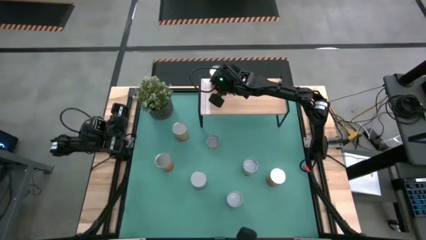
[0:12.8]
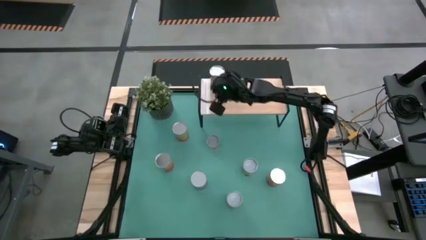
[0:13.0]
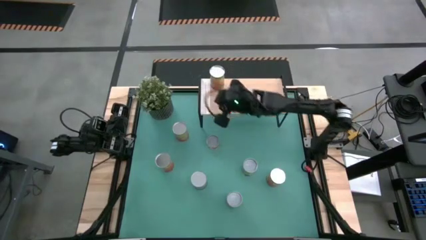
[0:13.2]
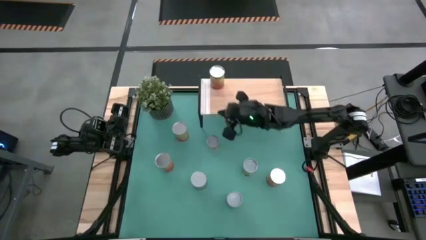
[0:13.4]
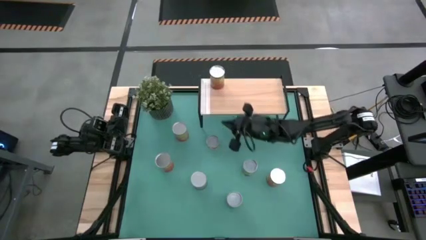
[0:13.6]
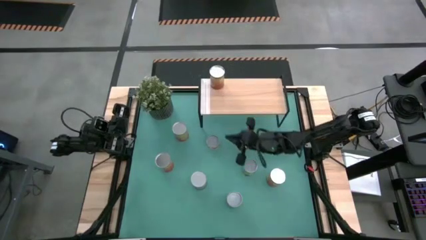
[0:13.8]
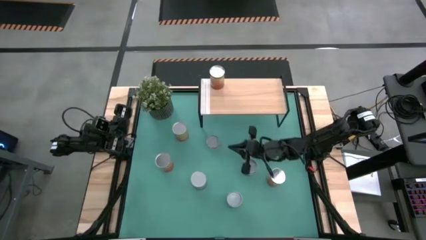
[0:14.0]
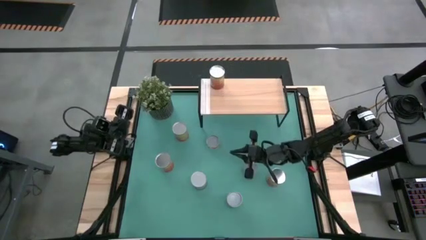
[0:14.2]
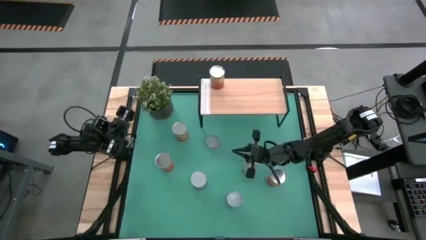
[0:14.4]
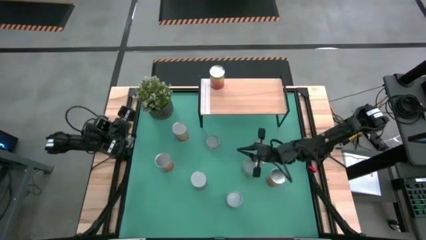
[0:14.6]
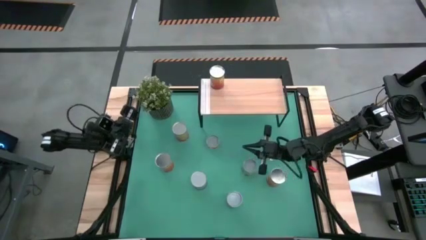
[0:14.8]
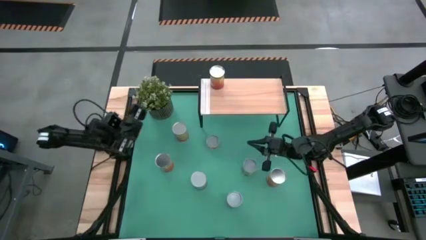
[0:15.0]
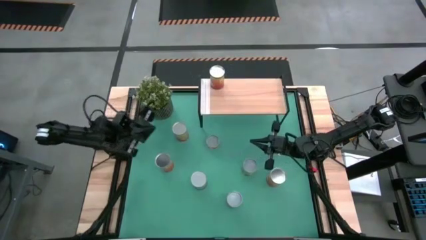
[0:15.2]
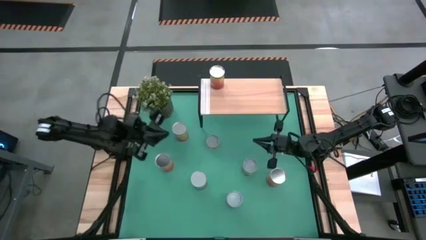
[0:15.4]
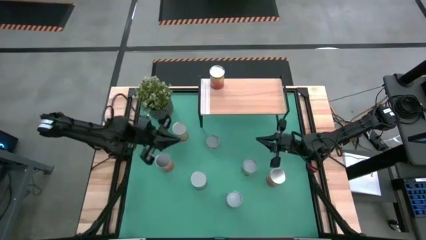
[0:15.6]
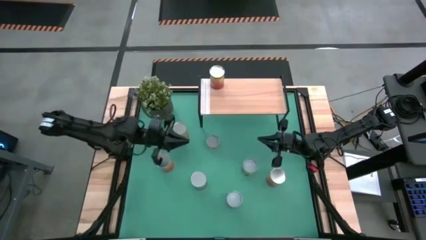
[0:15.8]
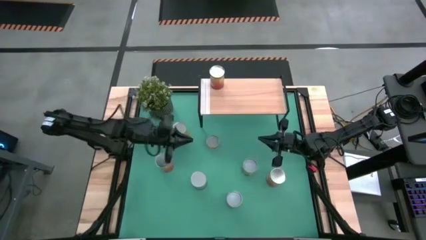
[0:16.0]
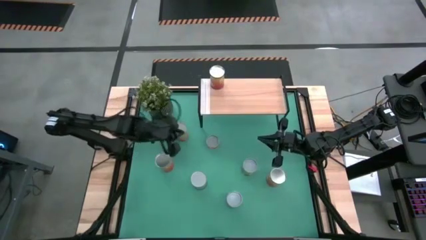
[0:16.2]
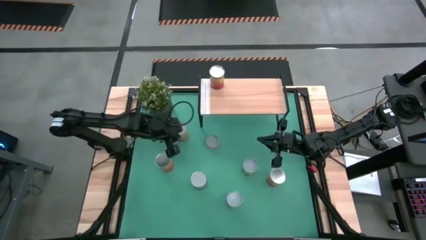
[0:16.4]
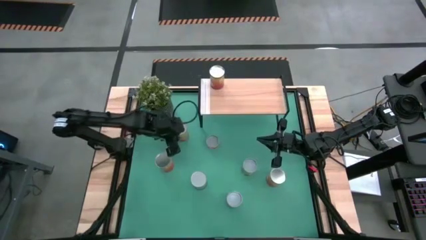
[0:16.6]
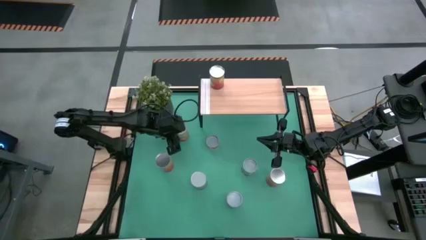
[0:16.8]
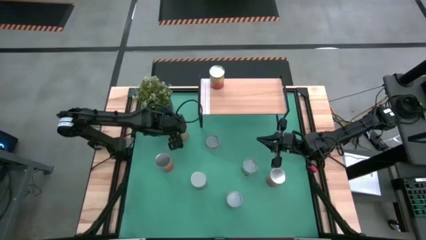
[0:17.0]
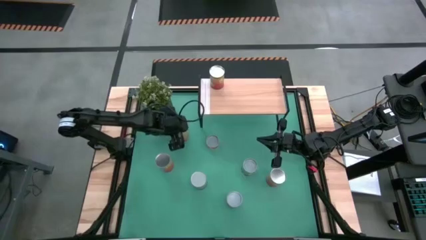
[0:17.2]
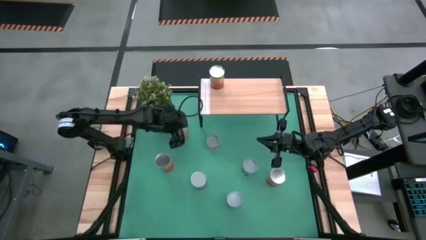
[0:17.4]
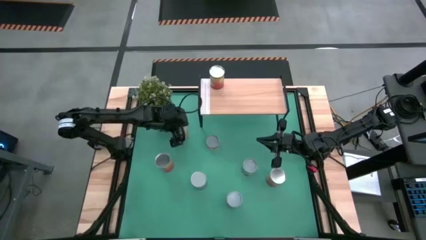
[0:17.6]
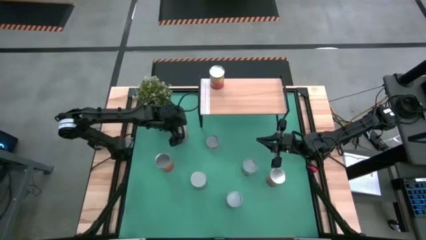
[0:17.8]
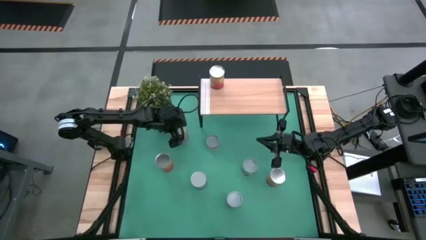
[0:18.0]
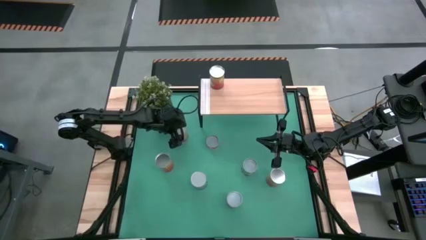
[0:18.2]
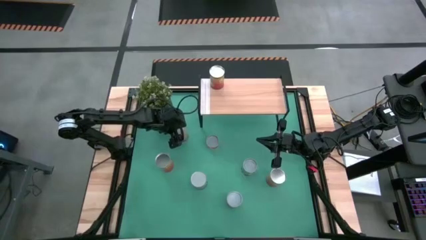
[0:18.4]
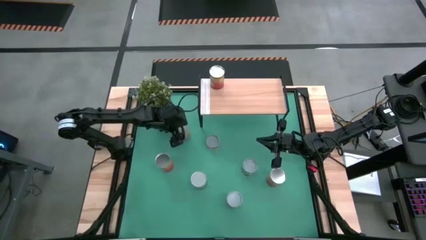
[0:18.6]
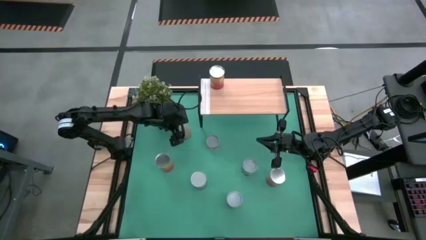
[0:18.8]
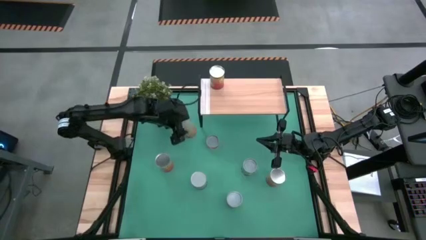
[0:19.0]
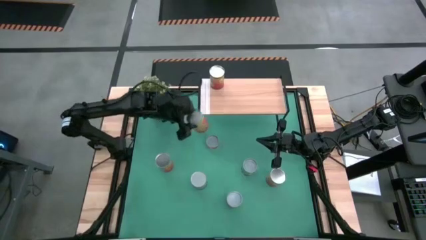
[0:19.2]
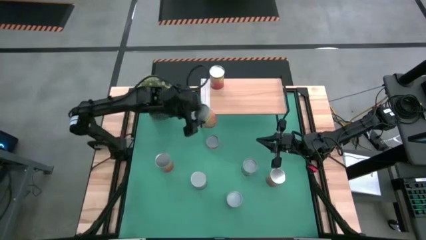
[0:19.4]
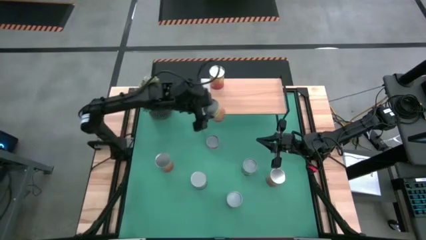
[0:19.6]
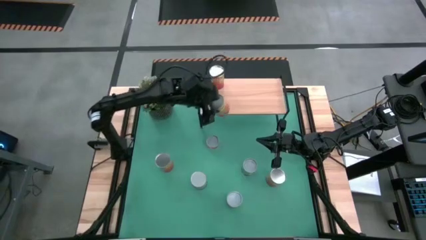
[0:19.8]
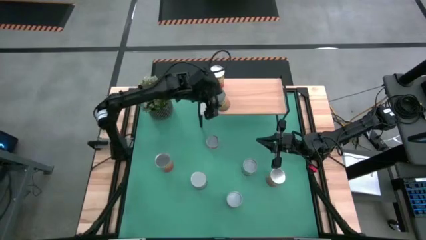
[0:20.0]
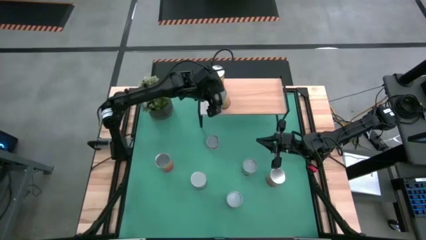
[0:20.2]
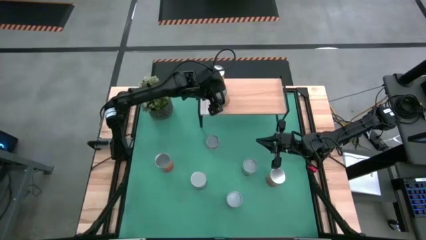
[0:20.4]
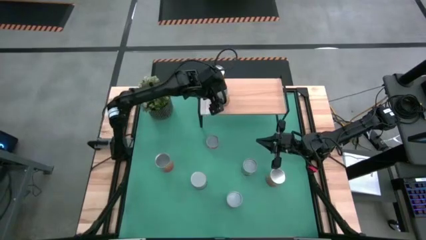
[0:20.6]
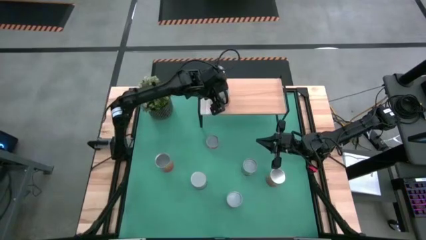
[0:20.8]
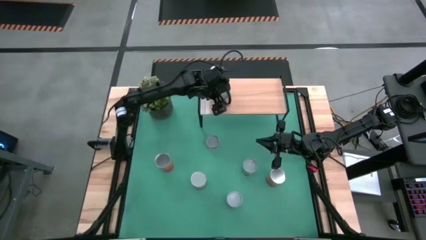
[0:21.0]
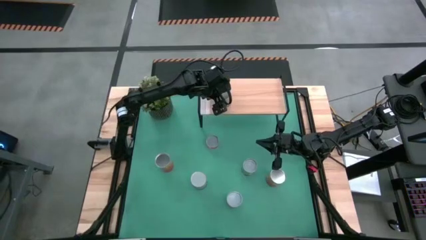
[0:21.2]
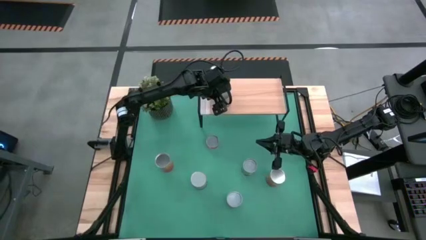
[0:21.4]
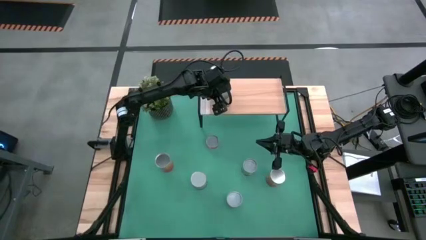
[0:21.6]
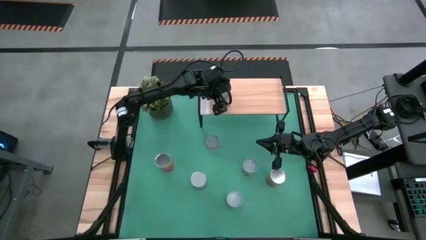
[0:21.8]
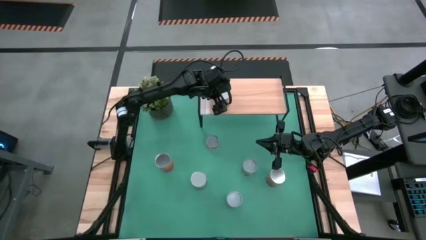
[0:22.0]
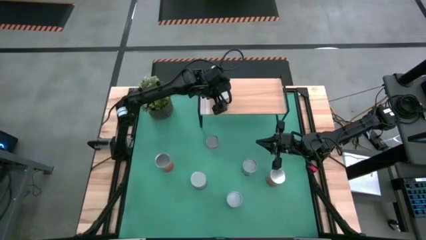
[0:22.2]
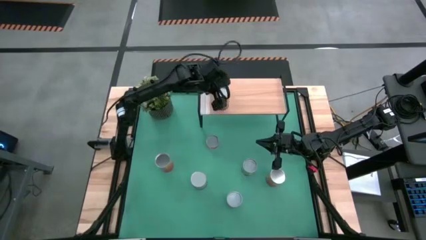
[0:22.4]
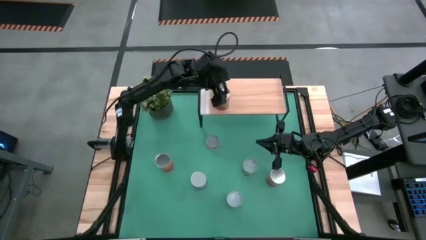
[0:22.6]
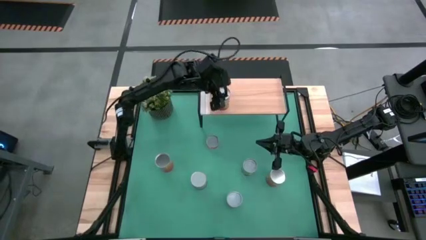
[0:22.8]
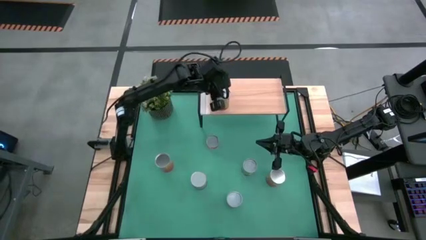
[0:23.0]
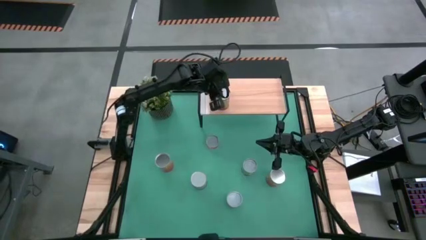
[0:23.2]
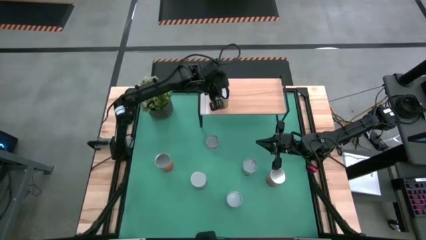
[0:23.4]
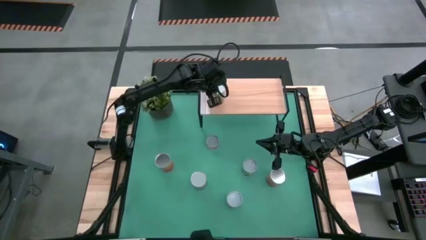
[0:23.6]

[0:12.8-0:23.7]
Task: Pick and place cans onto a shelf
Put the canned green beans on the shelf
